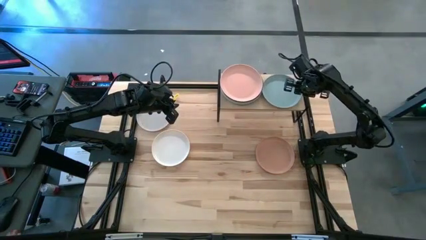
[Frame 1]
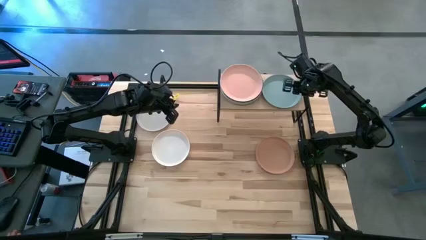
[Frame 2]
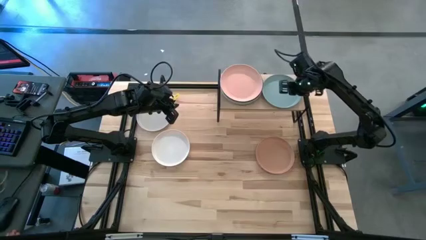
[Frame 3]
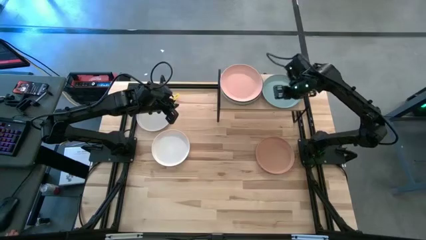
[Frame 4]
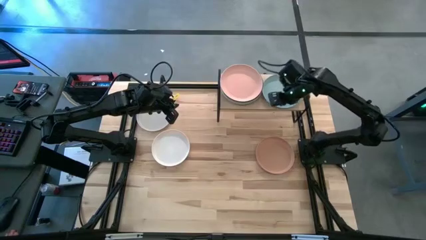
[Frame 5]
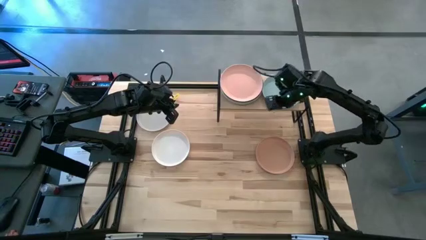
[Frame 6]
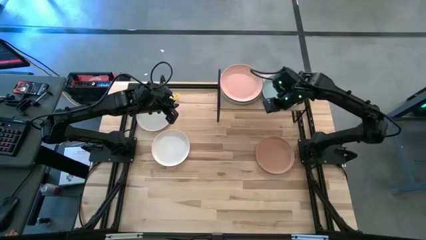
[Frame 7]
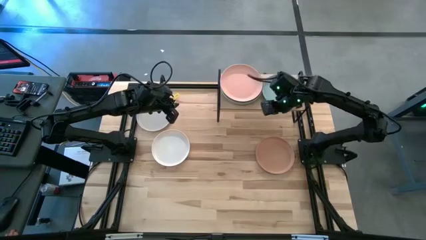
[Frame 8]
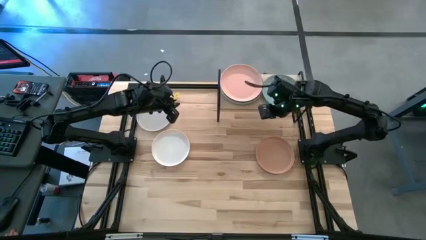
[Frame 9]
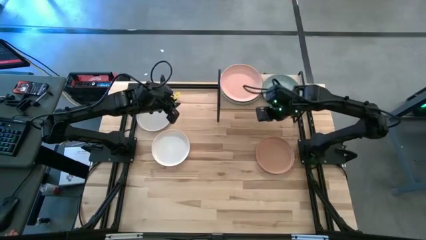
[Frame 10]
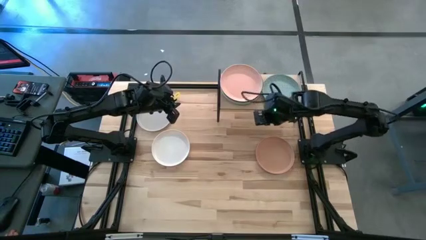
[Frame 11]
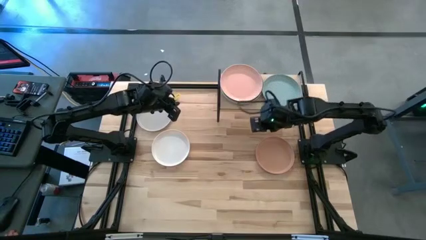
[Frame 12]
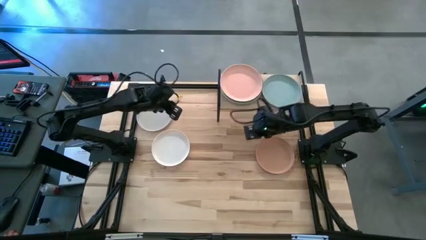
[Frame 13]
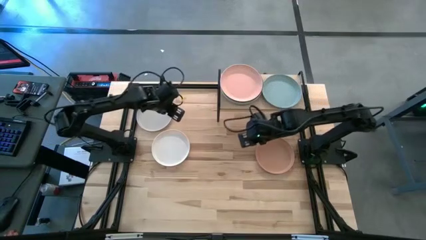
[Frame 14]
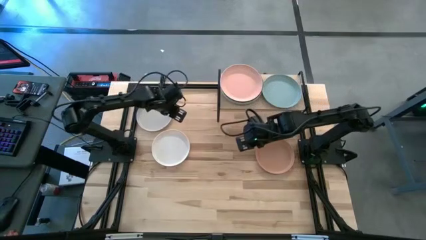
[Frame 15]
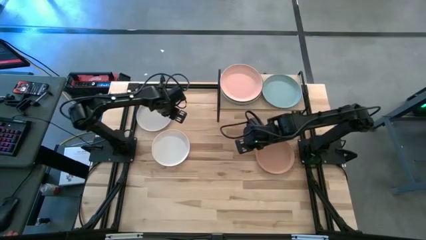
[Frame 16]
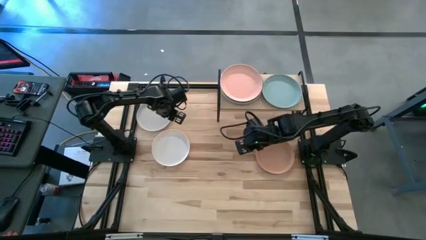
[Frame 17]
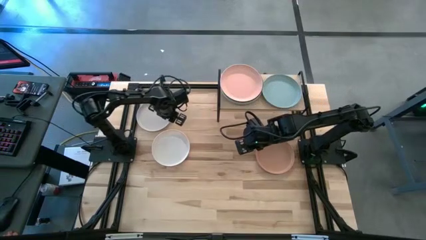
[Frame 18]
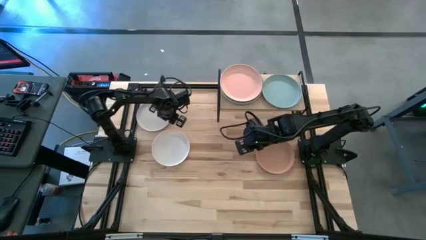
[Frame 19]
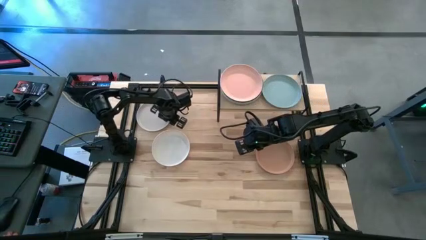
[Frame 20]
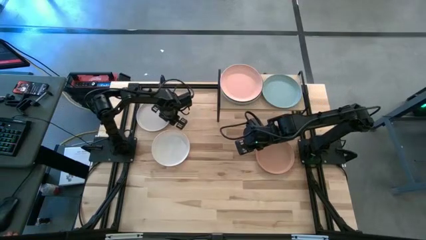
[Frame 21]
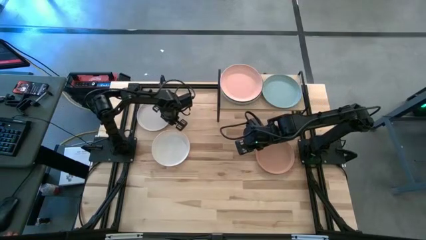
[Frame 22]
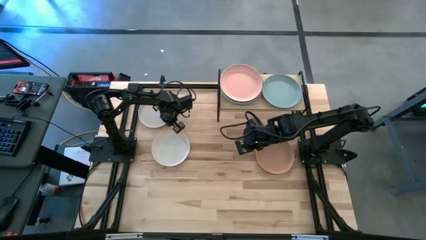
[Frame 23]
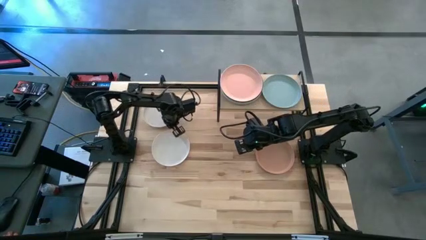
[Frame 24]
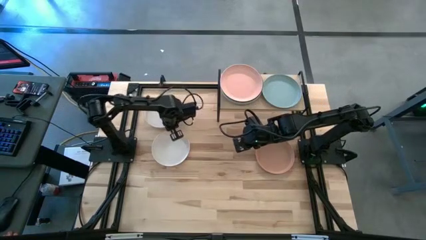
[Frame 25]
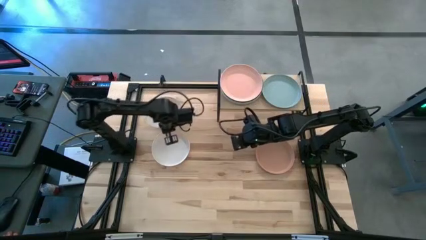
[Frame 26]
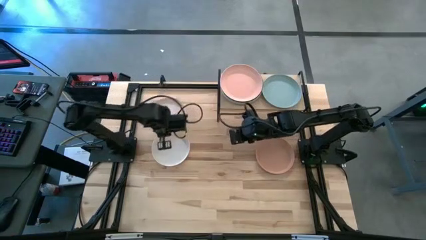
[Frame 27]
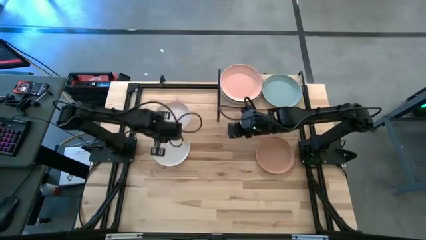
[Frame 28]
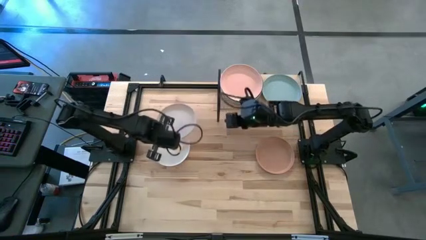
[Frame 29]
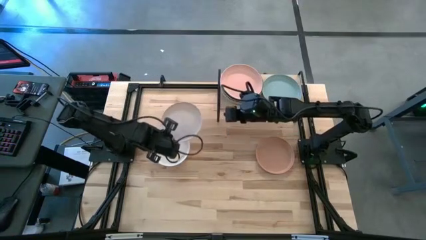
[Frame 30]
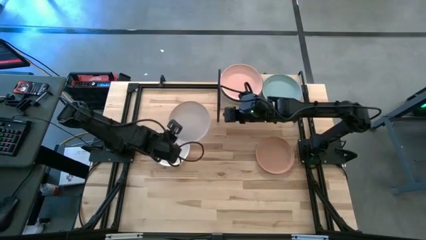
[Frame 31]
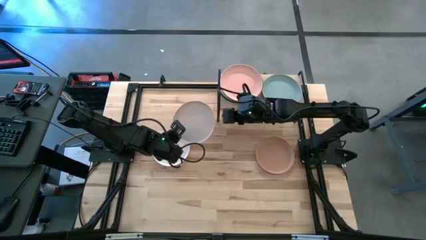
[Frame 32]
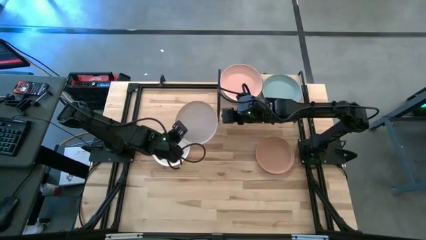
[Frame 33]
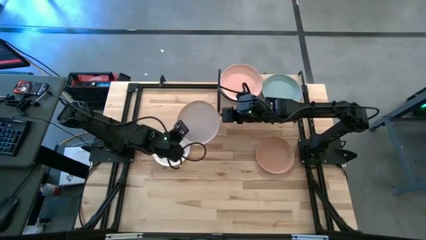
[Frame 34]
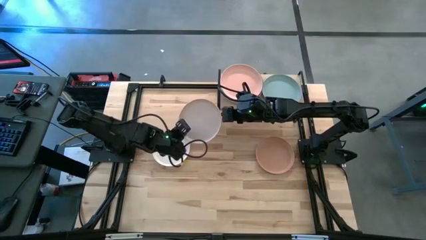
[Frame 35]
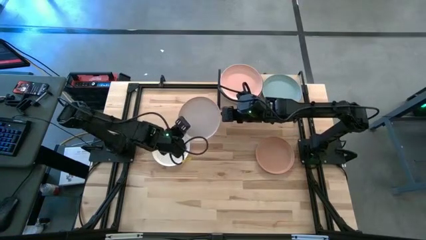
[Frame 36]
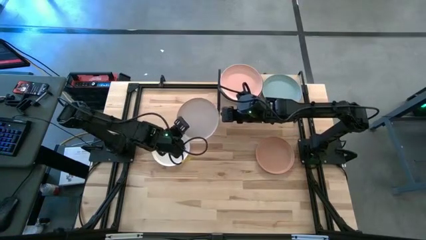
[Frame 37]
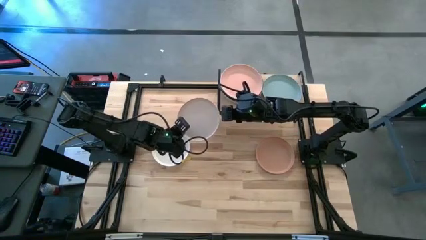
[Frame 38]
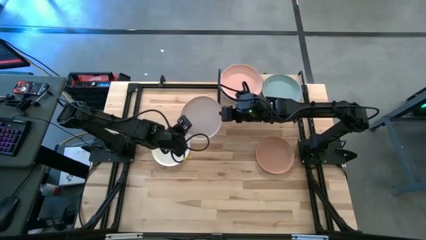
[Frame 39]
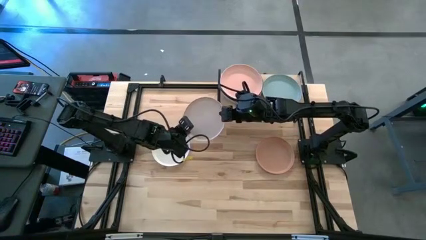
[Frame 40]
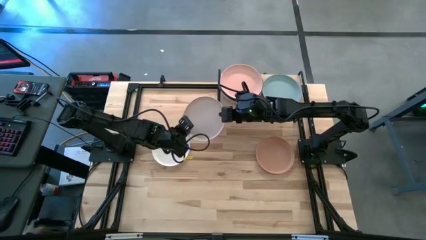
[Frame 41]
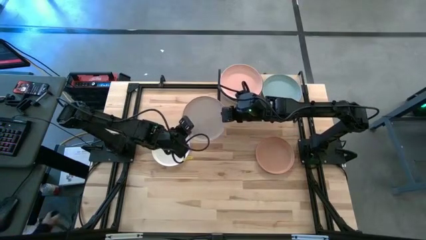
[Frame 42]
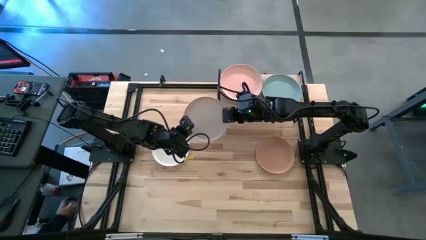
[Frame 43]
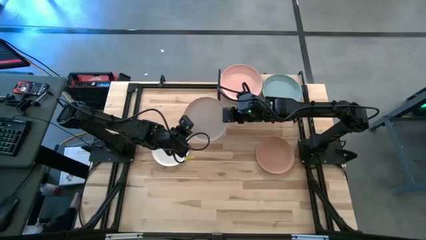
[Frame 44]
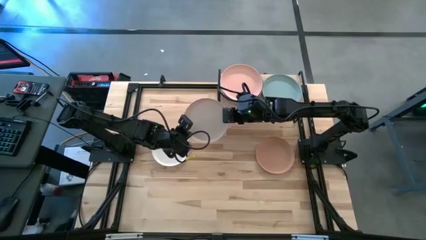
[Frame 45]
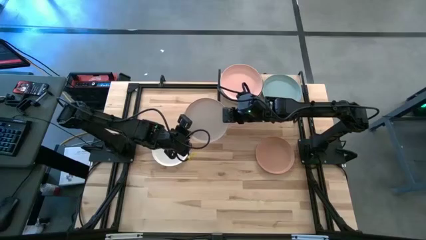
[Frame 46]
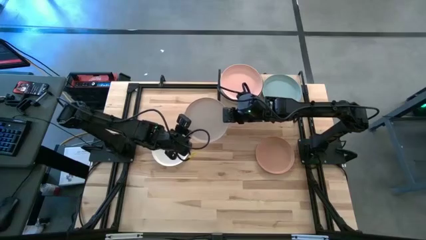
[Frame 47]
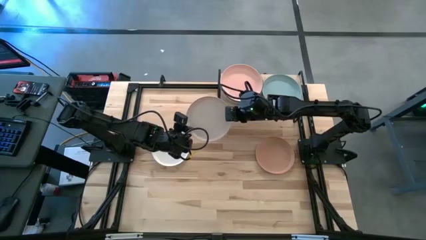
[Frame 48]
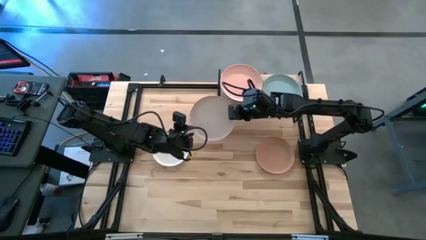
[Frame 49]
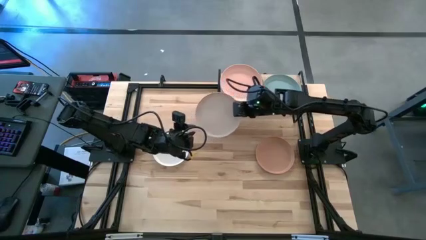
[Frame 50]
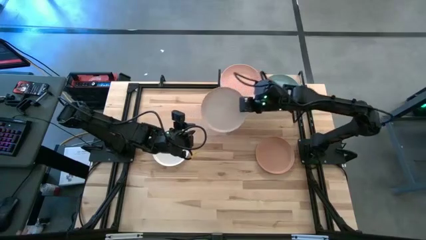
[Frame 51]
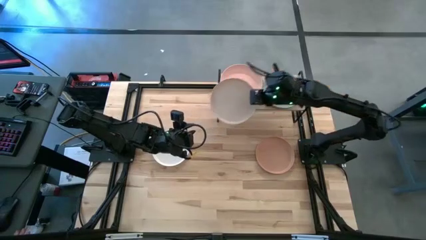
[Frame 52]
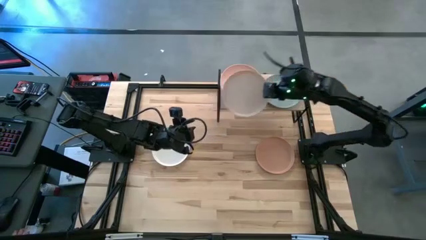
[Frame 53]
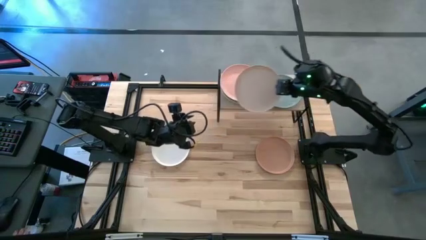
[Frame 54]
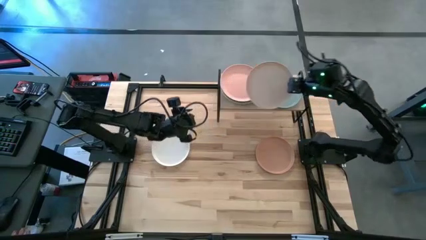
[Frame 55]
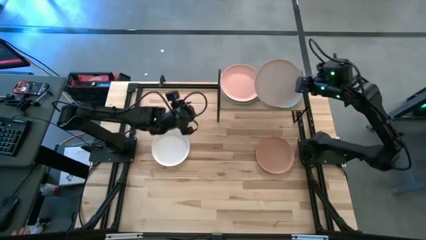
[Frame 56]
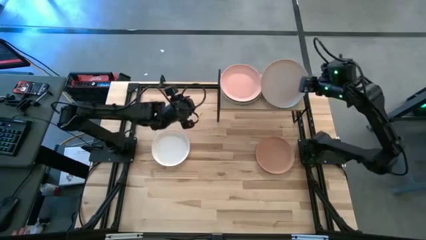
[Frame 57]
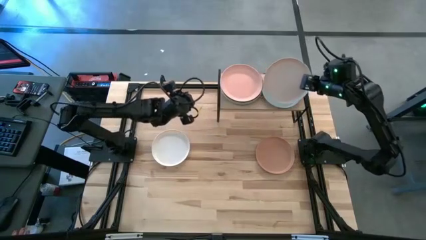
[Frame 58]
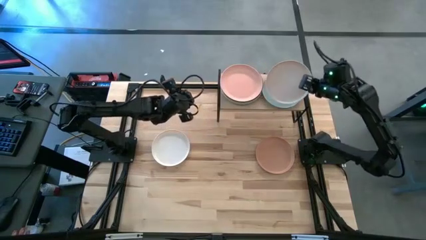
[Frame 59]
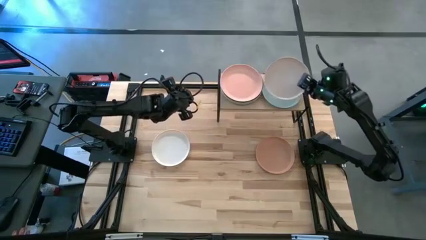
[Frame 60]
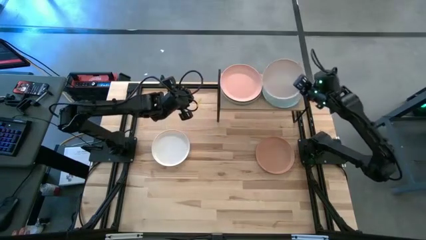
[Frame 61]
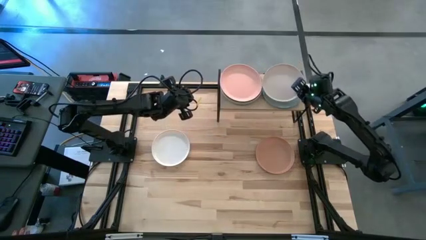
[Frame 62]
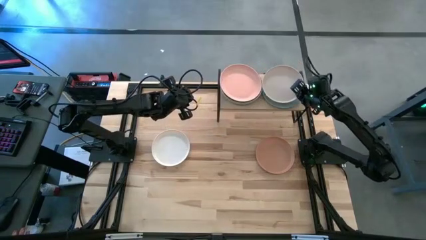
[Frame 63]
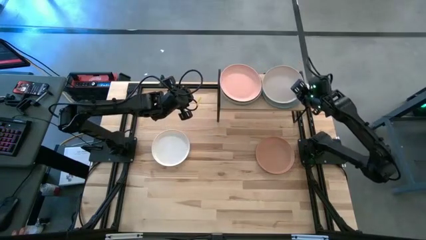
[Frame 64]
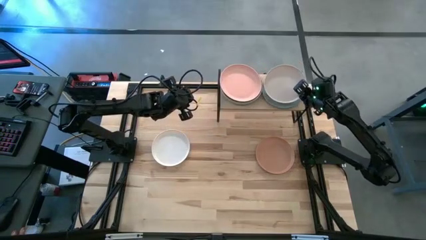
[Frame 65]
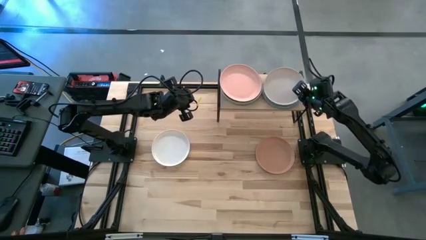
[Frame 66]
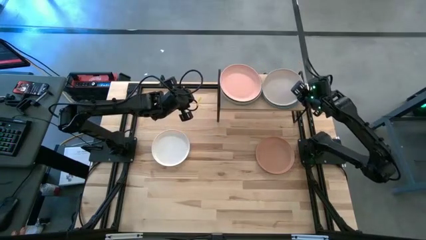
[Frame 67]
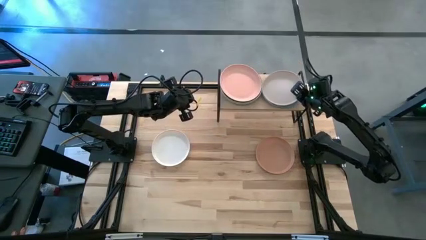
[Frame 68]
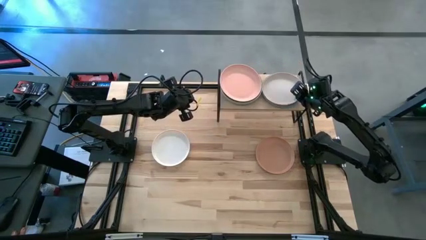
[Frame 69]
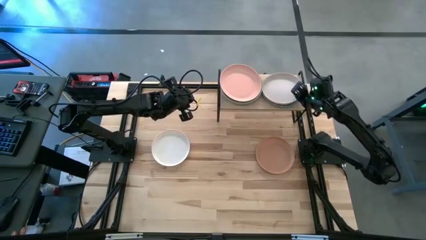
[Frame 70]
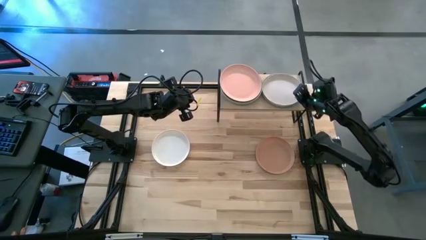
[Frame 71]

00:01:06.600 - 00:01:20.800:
Task: Place and stack plates onto a shelf
Stack the top white plate on top of the blue plate on the shelf

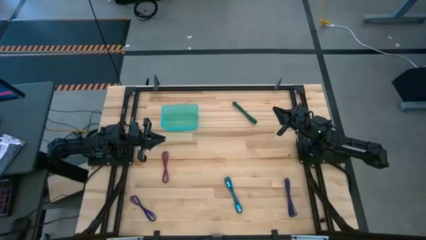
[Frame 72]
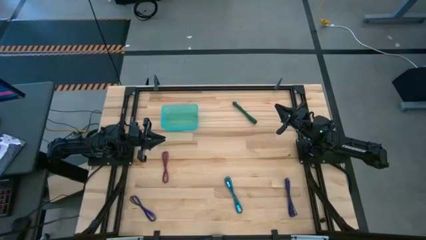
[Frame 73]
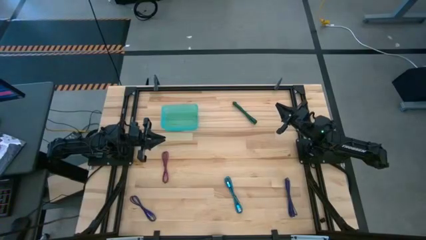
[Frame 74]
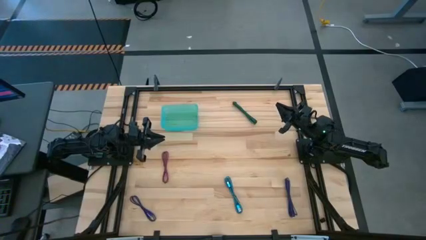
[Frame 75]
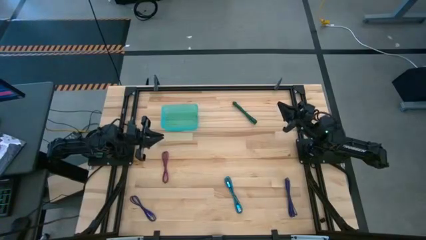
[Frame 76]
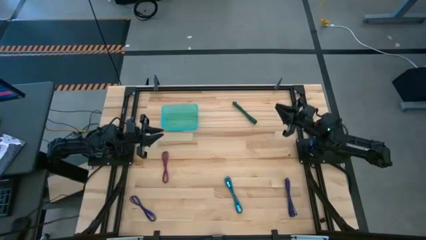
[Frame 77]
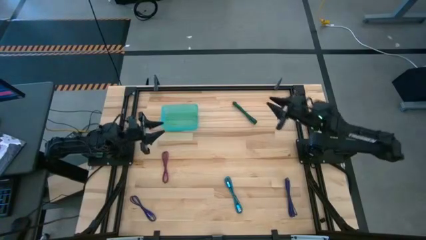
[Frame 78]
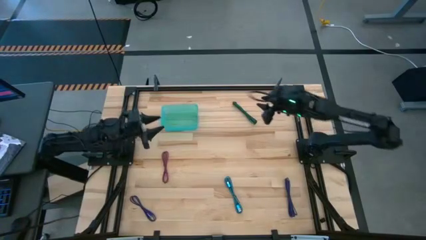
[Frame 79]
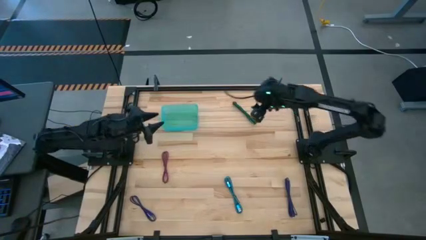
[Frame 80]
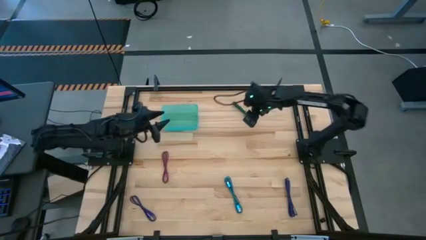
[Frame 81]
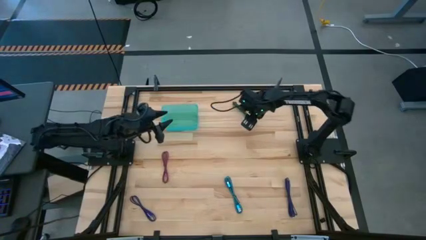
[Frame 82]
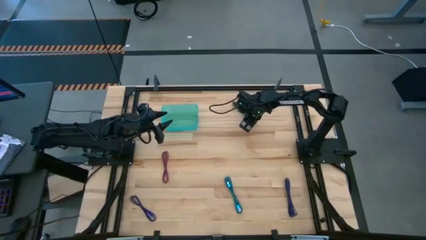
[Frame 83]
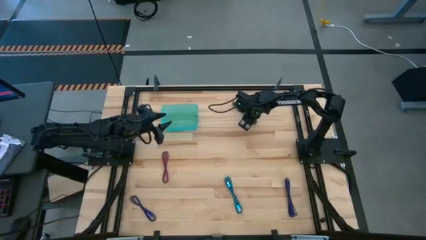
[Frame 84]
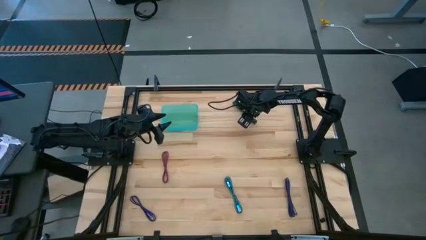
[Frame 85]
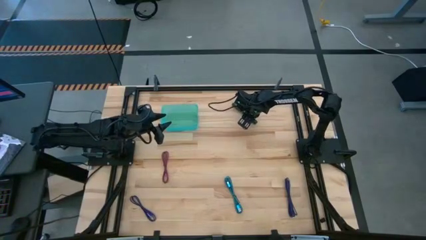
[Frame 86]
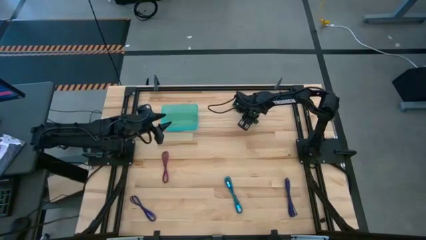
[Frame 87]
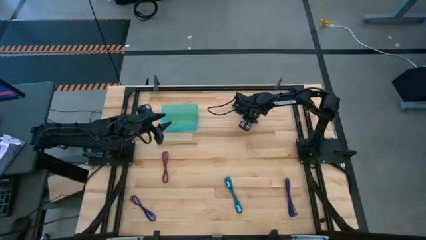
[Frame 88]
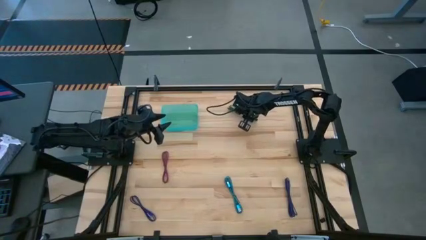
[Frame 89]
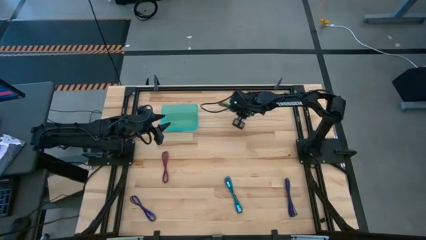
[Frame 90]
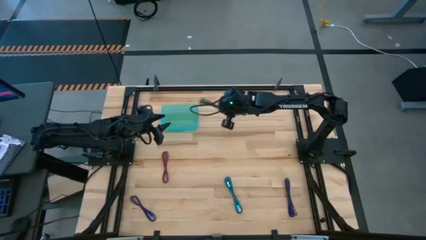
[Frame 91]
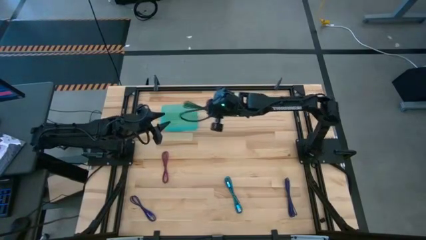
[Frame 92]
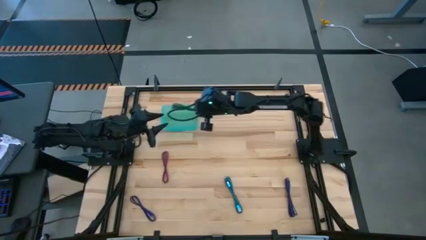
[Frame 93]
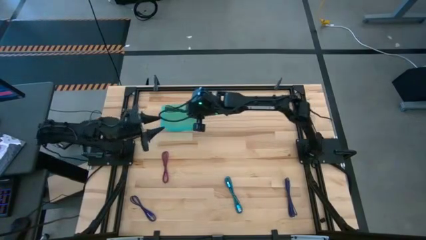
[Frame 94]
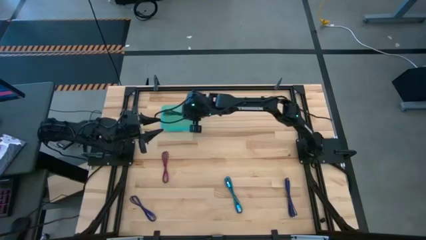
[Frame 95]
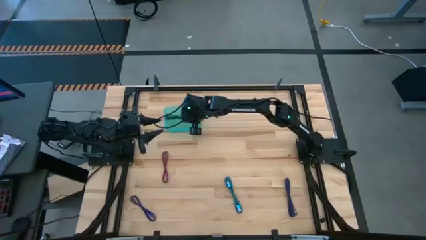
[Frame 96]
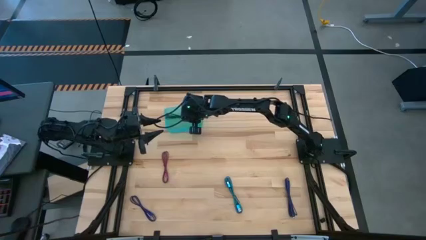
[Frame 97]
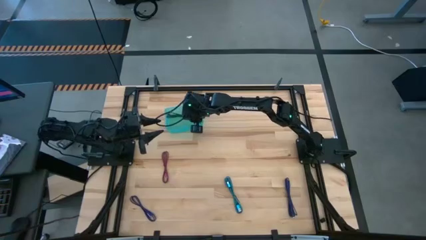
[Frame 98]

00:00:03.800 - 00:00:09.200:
Task: Pick and place USB-C Cables
Put the black charger cable into the green bin
